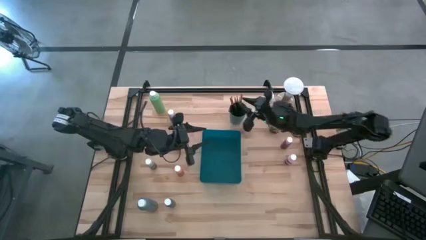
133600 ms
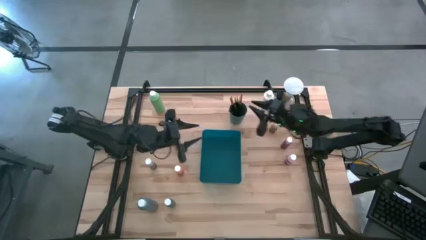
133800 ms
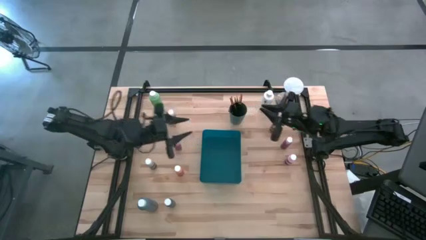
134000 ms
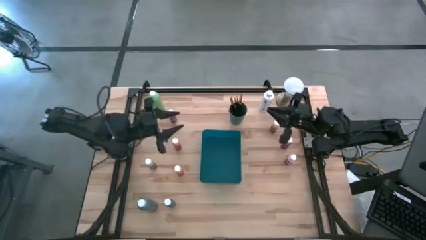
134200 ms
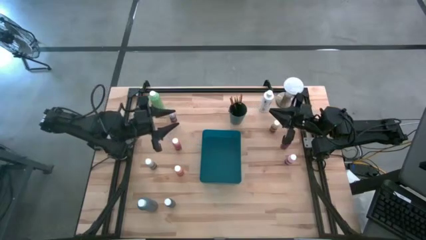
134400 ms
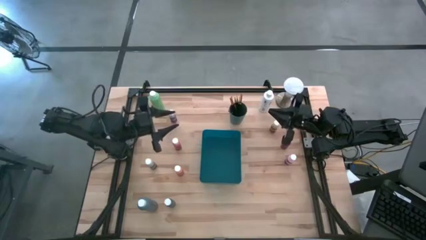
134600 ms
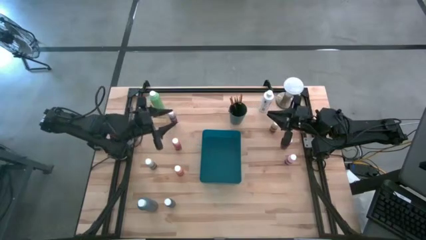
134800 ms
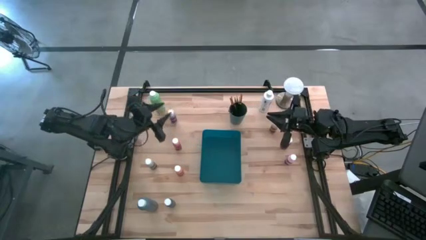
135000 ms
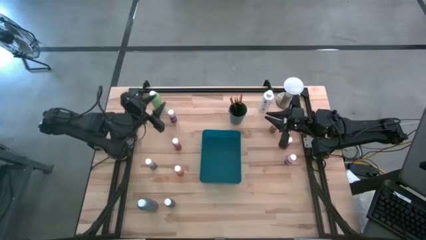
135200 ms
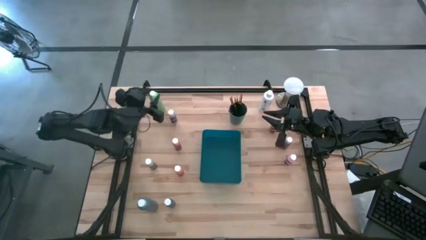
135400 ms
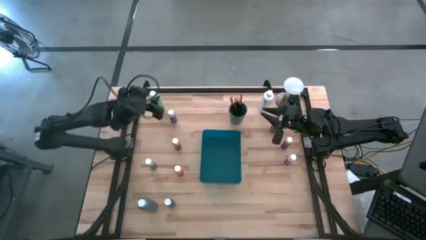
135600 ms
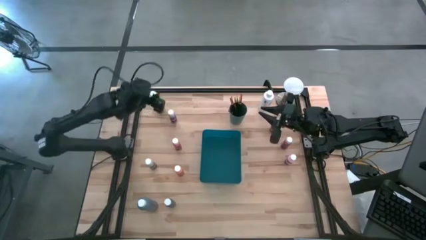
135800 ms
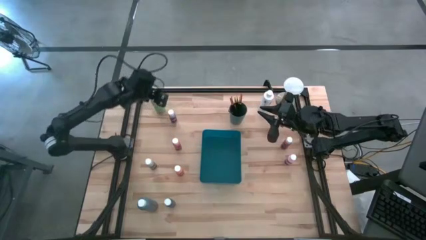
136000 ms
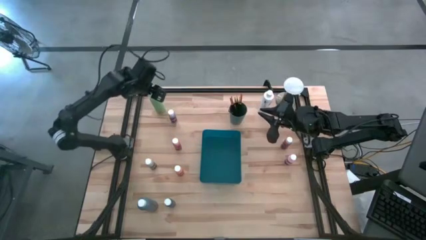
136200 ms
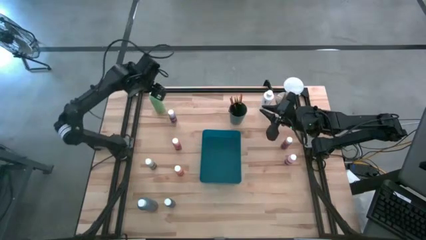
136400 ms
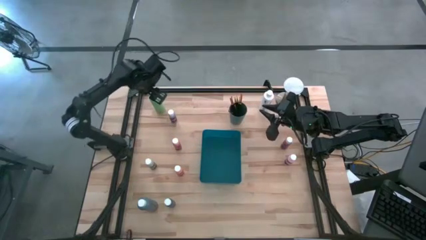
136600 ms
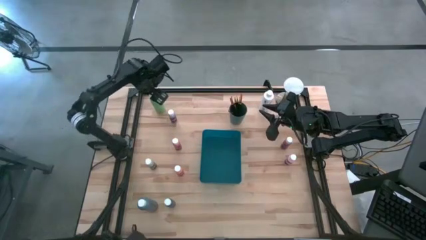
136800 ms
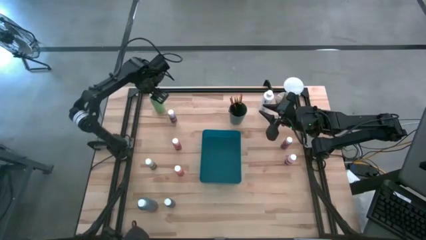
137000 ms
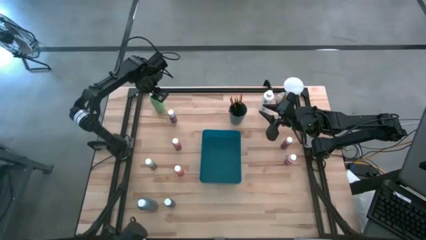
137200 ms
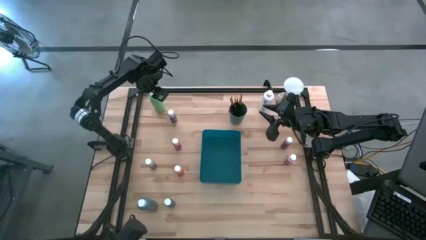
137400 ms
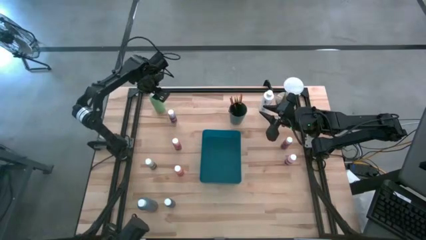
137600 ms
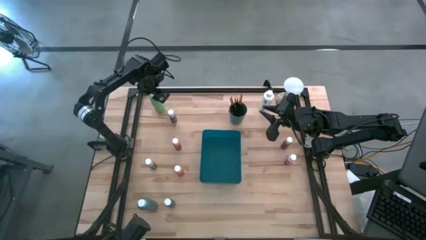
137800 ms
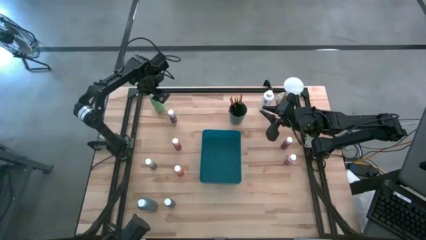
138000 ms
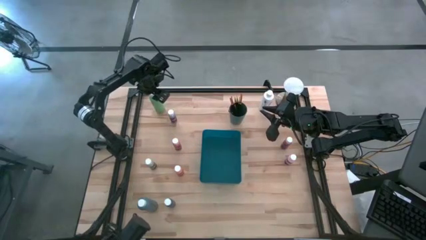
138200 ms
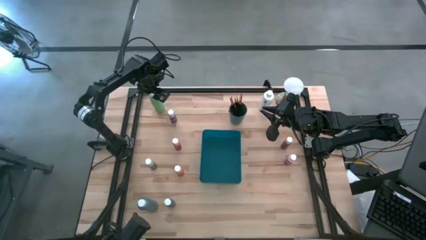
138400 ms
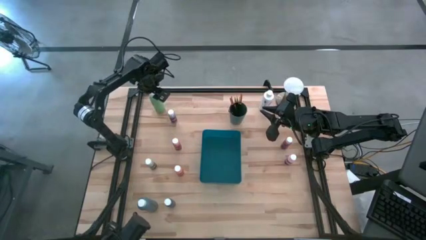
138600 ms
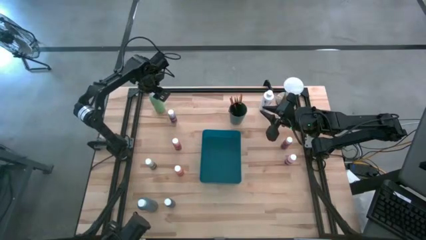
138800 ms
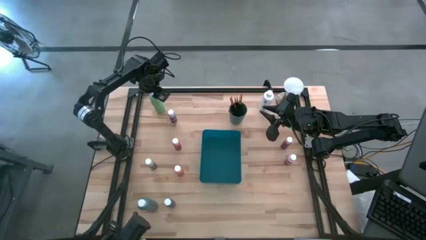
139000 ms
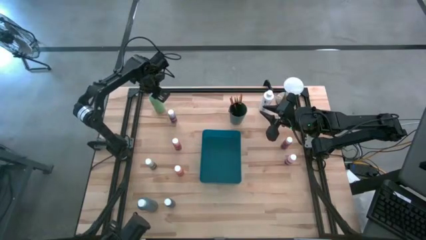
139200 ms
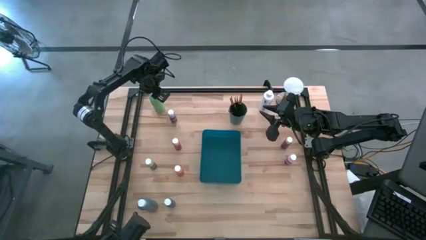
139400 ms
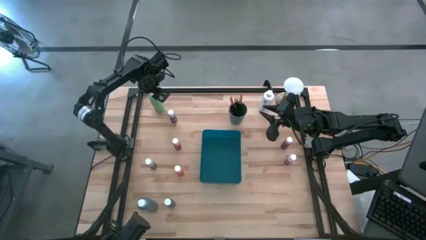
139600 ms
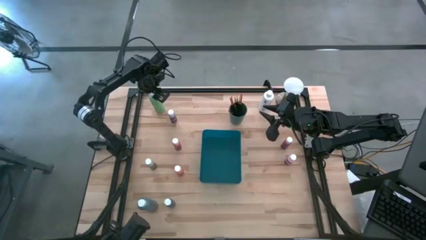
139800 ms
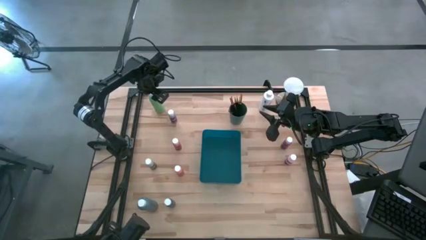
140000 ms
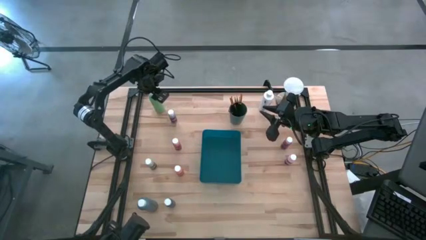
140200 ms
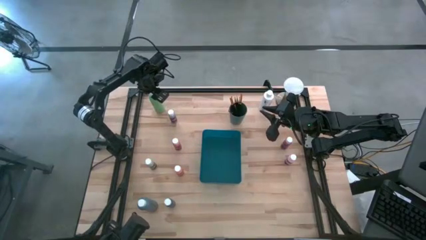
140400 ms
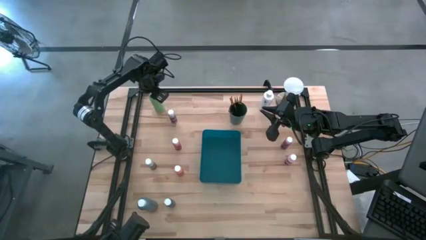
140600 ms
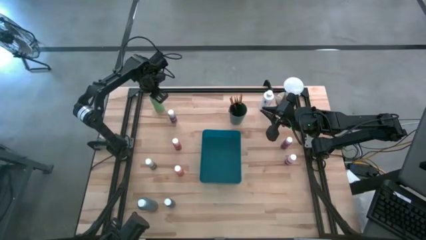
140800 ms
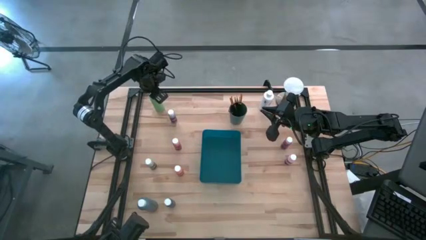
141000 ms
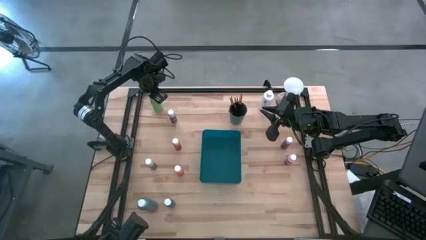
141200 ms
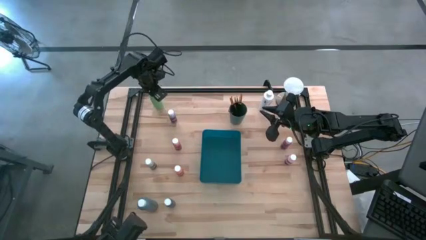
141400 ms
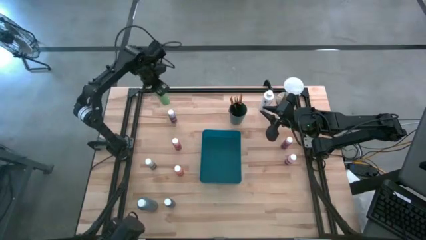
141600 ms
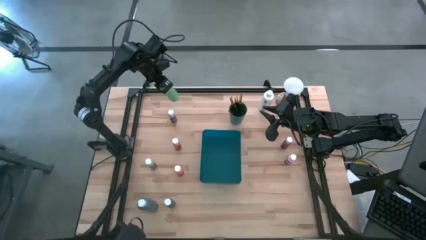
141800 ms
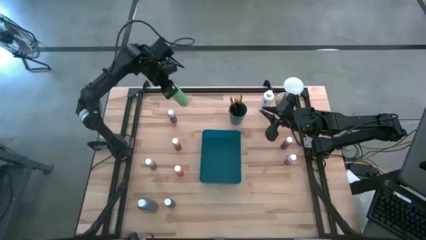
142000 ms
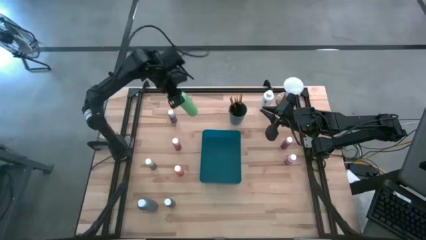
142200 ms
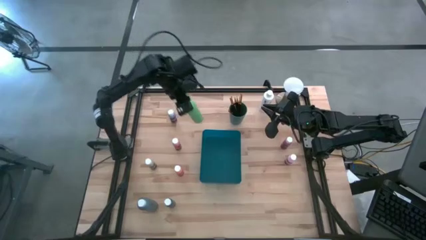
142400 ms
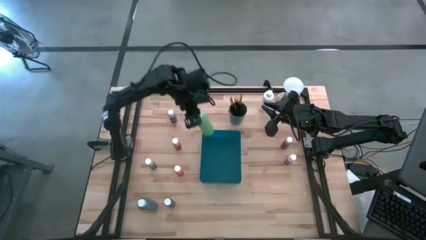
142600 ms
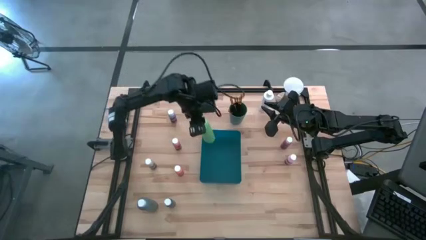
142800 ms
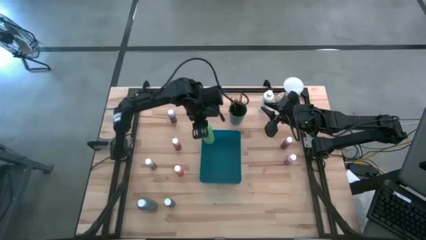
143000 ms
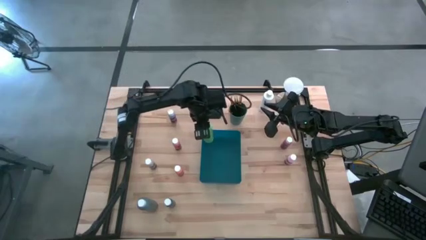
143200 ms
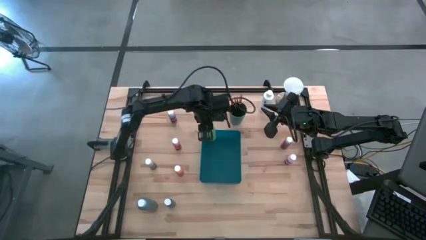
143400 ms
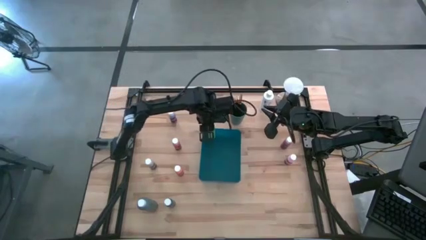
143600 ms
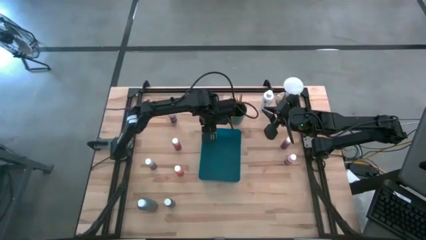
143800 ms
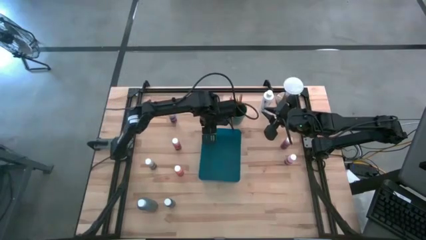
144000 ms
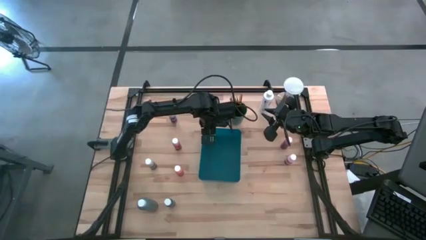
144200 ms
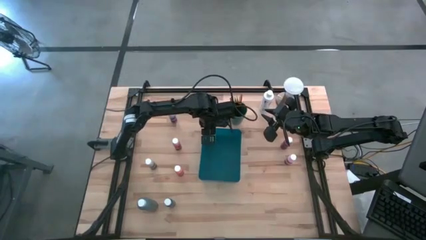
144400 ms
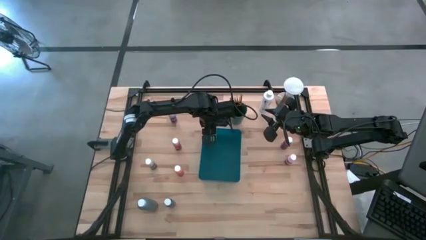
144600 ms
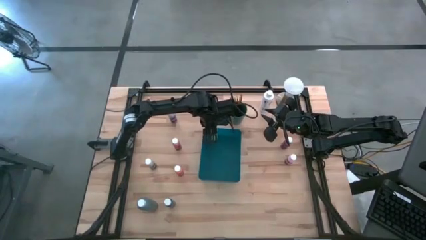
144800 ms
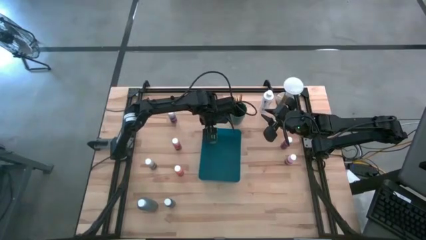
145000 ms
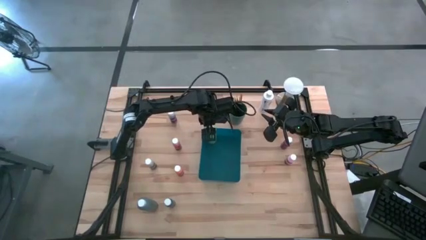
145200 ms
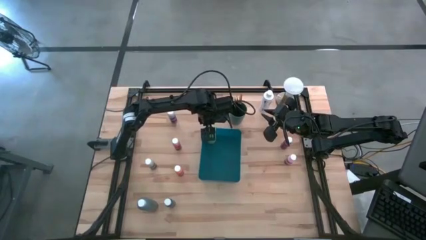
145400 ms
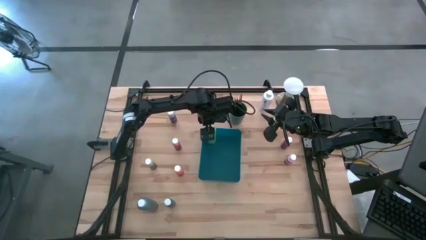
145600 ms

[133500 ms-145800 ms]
Task: Pick & Place Paint Supplies
Put the large green paint bottle into the blue bin

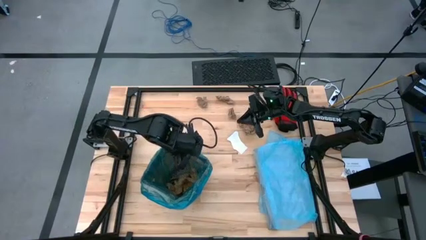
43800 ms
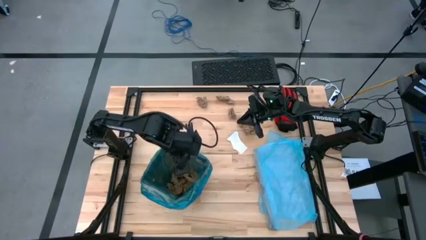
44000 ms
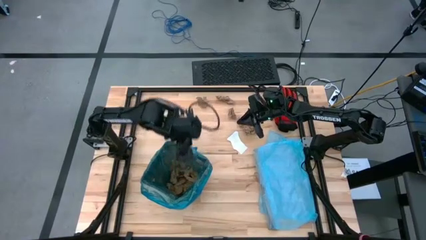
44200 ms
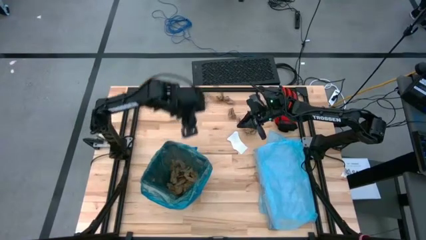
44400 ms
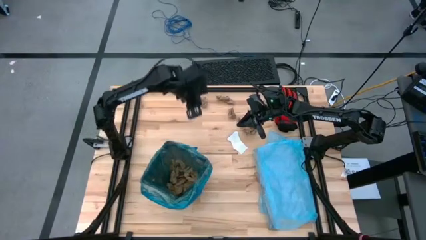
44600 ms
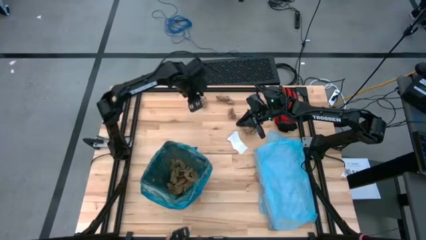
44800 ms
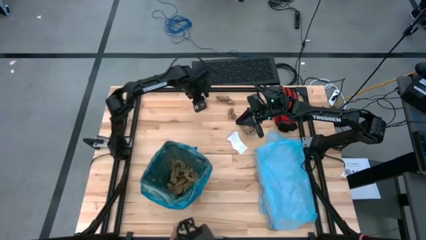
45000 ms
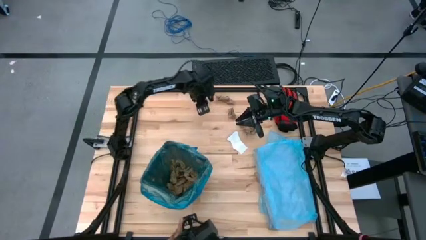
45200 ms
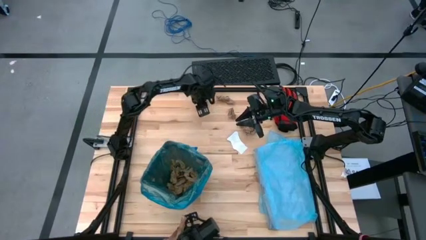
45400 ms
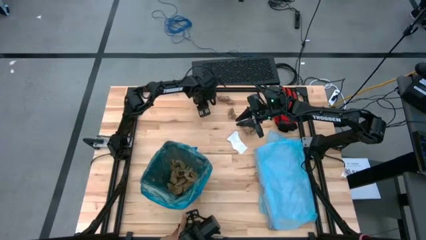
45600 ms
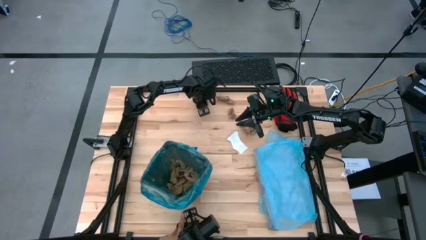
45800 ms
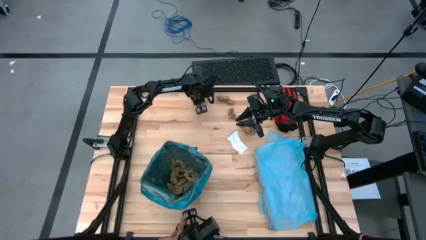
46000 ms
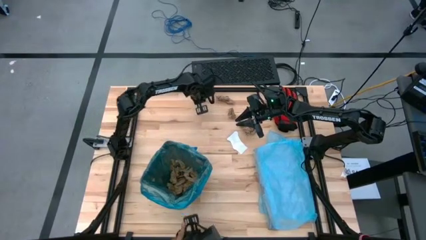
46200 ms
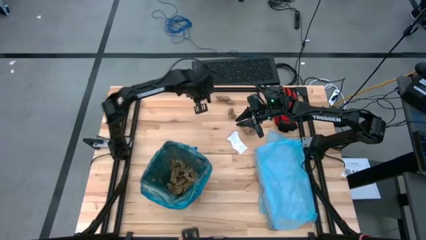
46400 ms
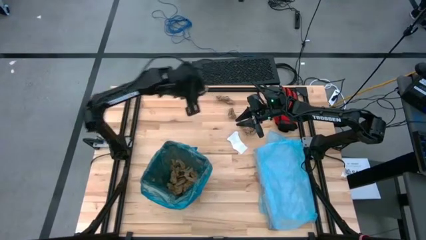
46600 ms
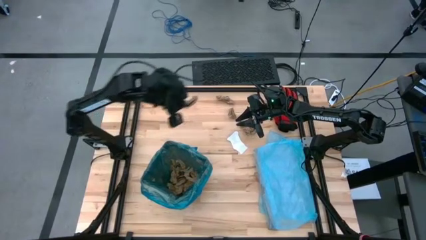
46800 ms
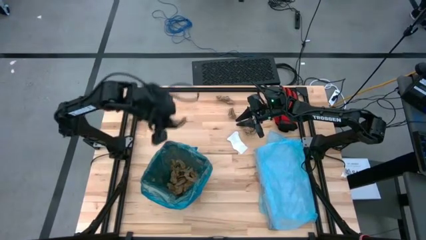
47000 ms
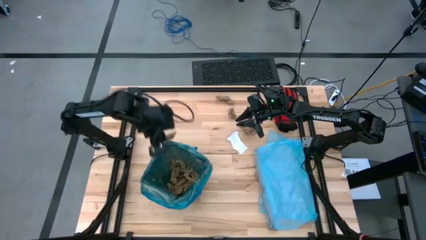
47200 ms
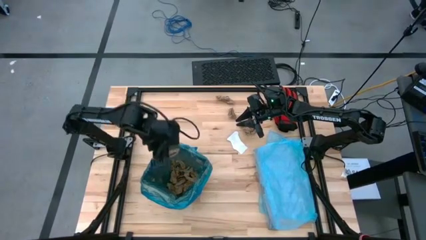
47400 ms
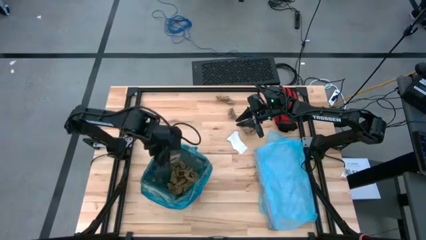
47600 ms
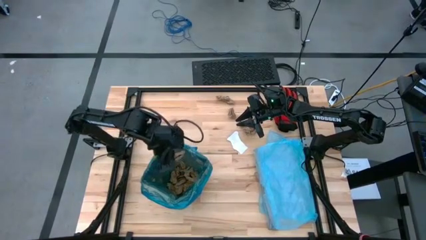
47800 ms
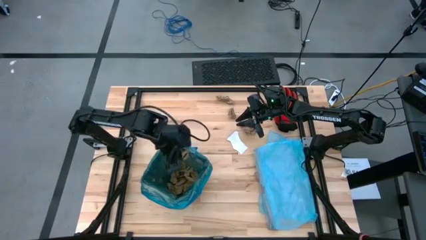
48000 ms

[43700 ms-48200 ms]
Task: place trash/remove bag and relplace
Put the brown napkin into the trash bin

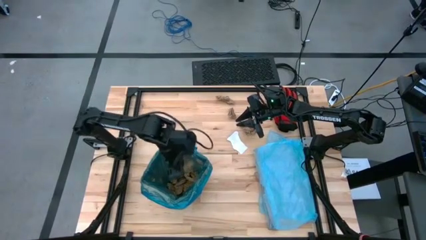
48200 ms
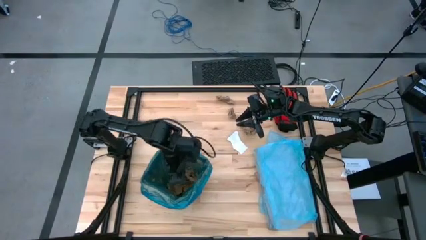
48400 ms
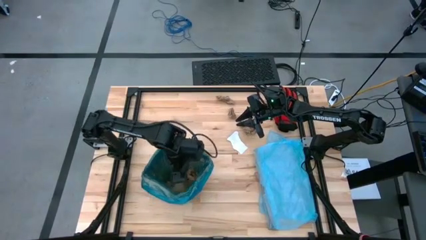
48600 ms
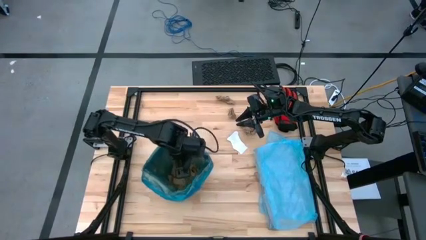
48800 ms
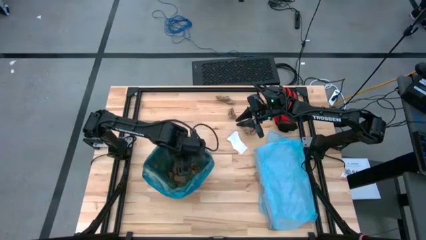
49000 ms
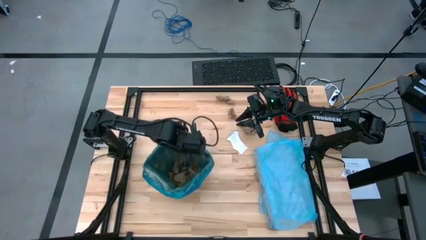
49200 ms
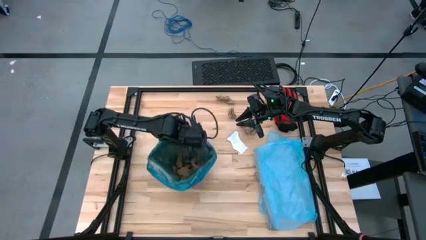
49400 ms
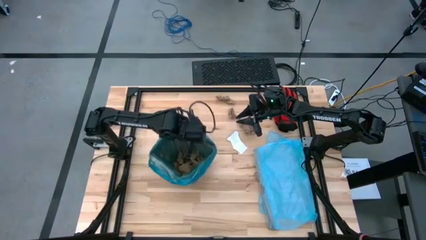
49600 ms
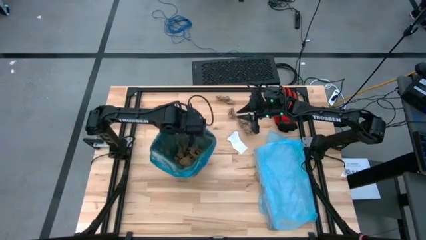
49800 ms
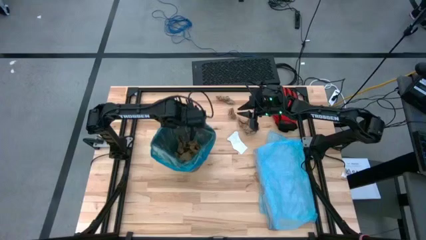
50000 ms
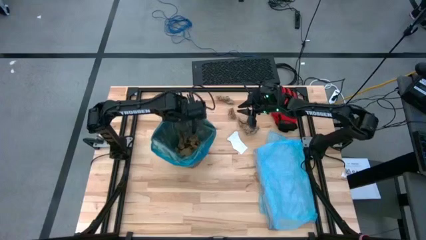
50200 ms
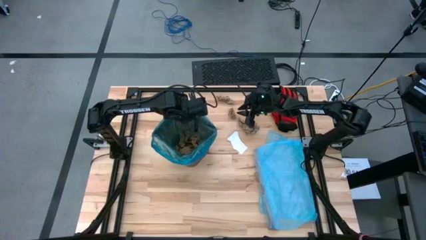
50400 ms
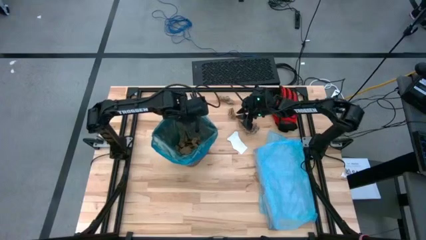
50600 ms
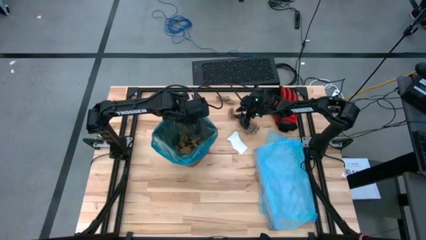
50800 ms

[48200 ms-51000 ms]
Adjust the trash bin
